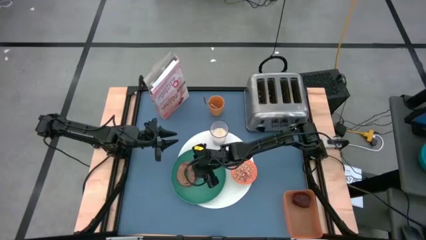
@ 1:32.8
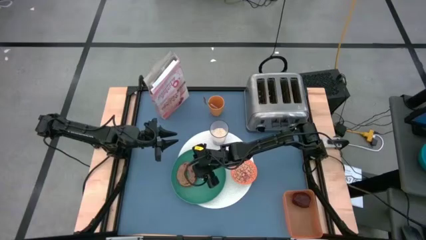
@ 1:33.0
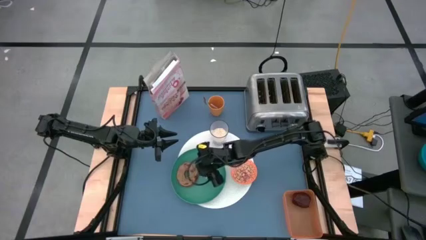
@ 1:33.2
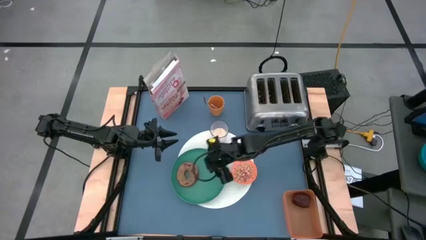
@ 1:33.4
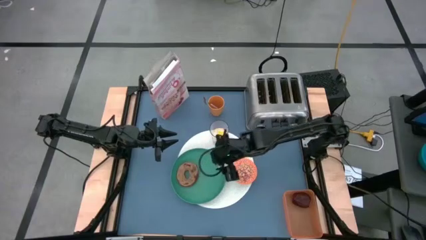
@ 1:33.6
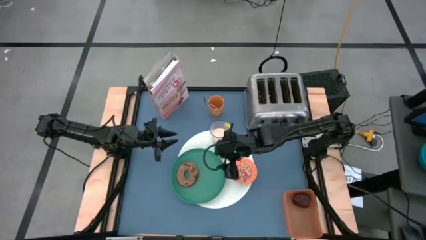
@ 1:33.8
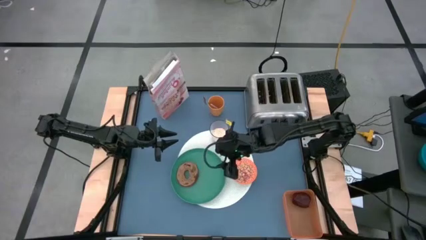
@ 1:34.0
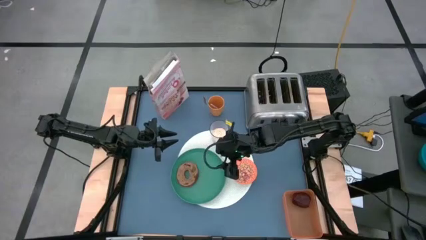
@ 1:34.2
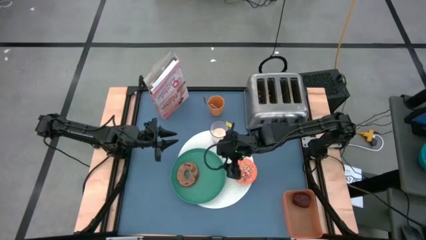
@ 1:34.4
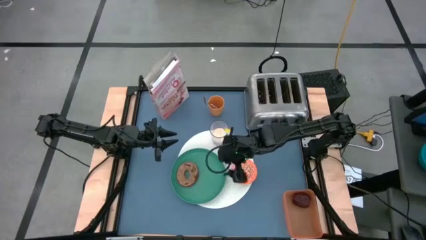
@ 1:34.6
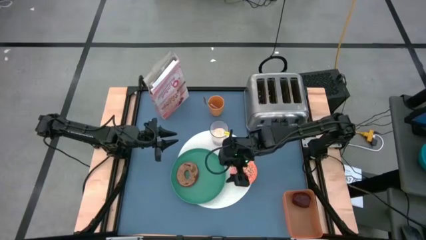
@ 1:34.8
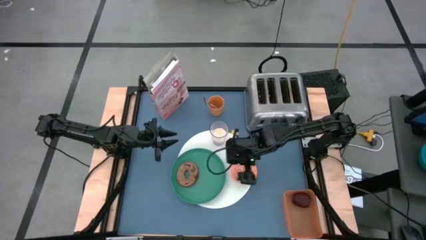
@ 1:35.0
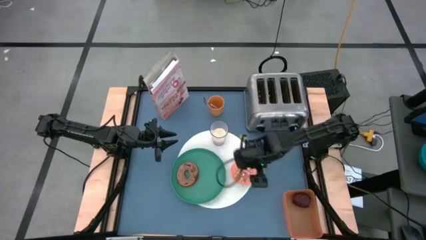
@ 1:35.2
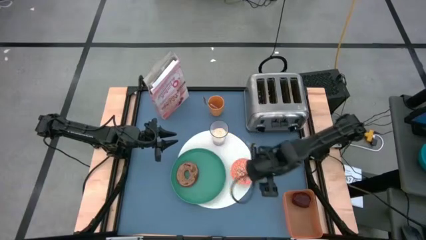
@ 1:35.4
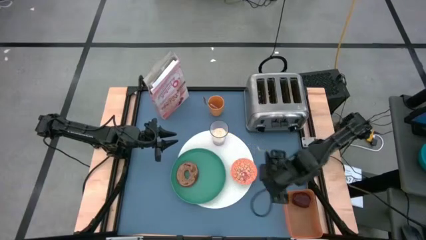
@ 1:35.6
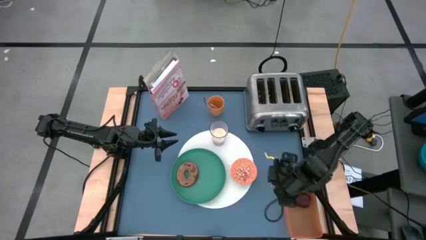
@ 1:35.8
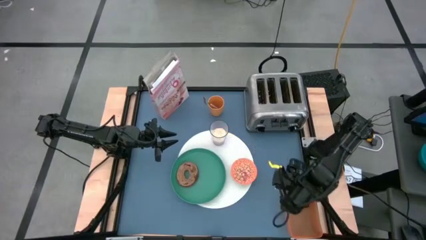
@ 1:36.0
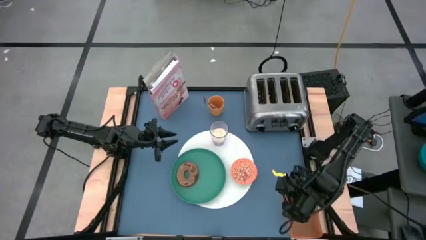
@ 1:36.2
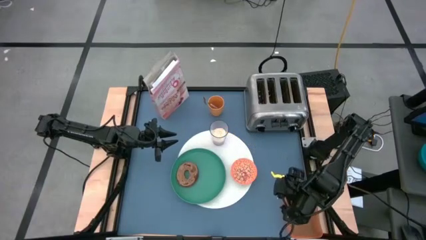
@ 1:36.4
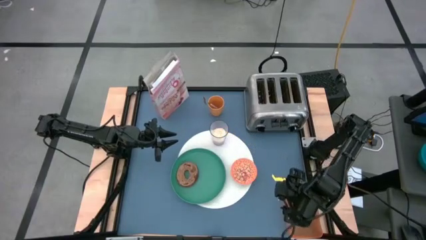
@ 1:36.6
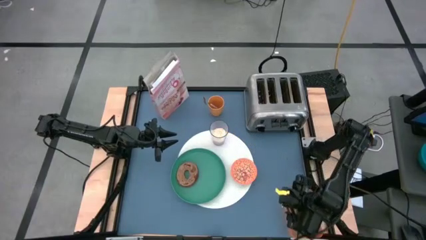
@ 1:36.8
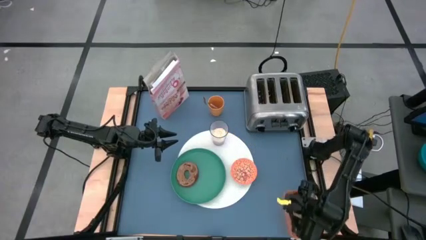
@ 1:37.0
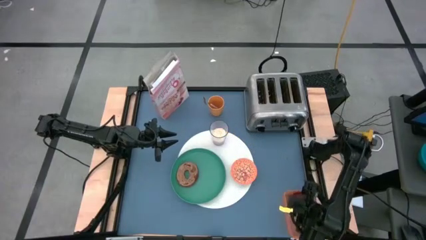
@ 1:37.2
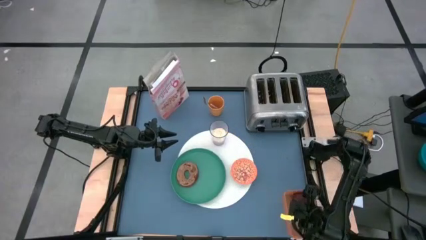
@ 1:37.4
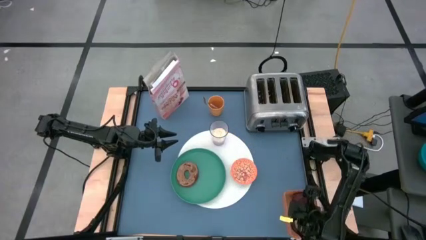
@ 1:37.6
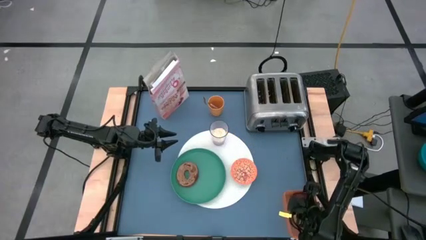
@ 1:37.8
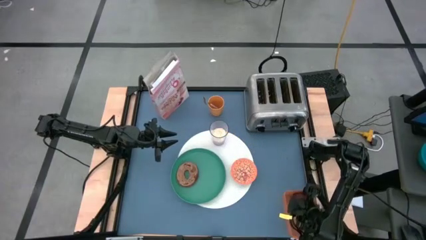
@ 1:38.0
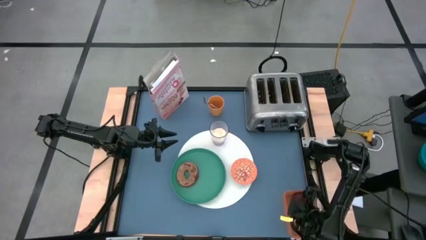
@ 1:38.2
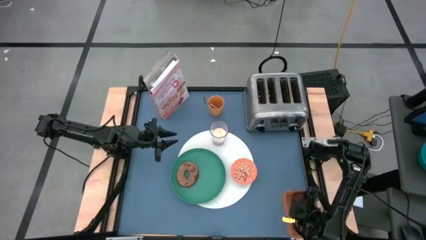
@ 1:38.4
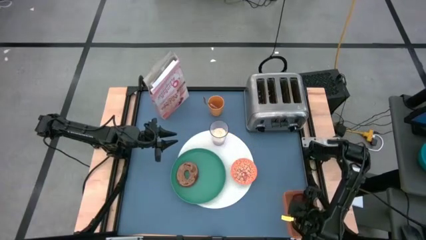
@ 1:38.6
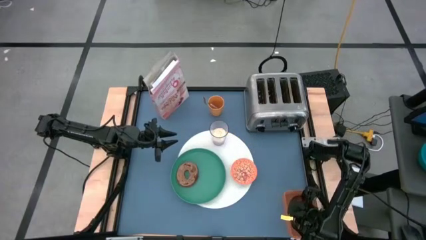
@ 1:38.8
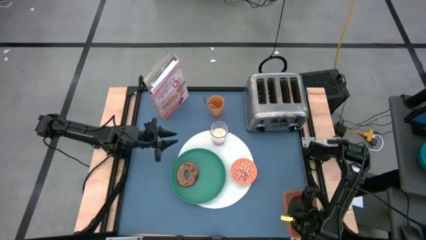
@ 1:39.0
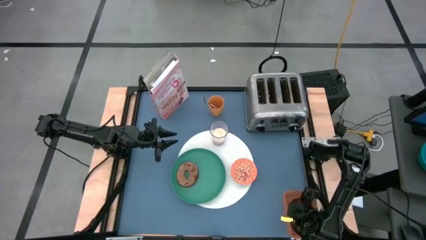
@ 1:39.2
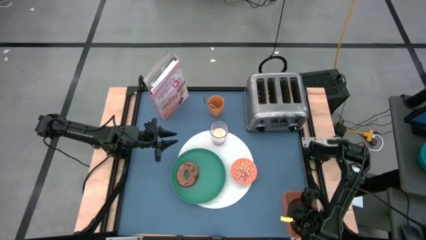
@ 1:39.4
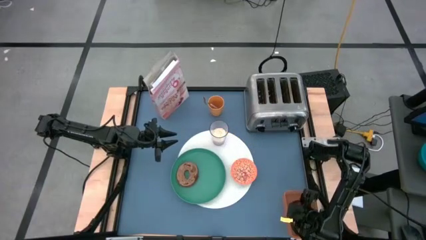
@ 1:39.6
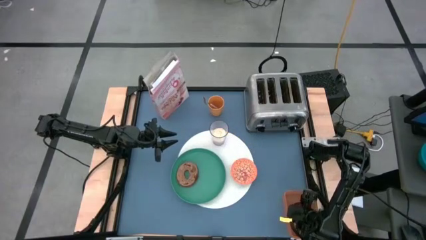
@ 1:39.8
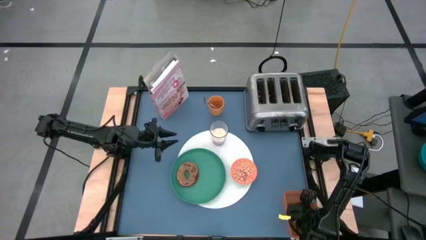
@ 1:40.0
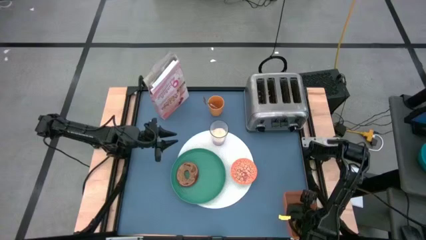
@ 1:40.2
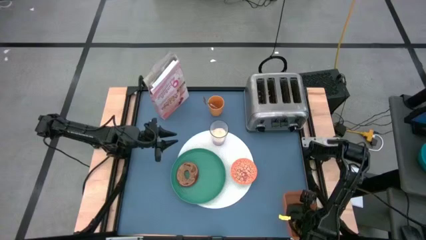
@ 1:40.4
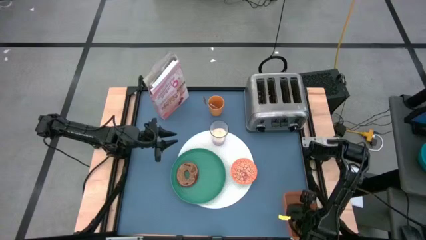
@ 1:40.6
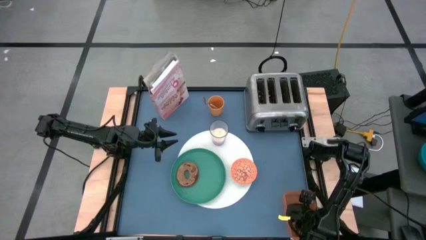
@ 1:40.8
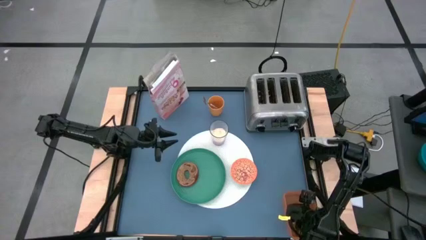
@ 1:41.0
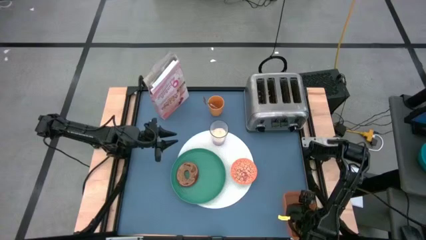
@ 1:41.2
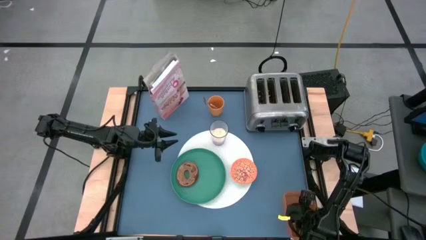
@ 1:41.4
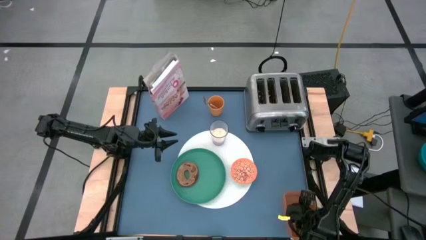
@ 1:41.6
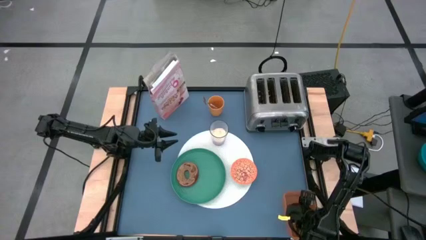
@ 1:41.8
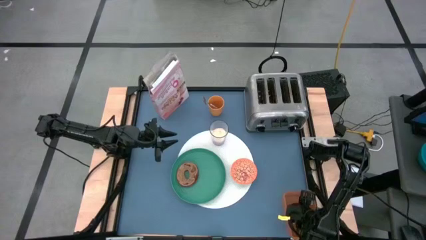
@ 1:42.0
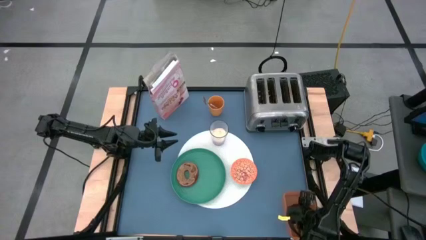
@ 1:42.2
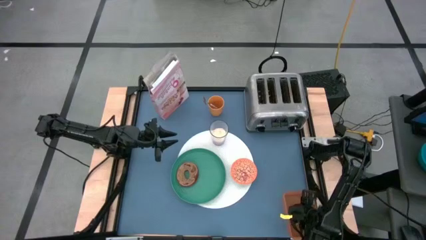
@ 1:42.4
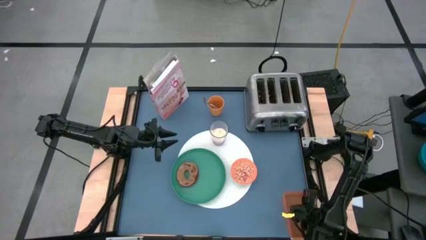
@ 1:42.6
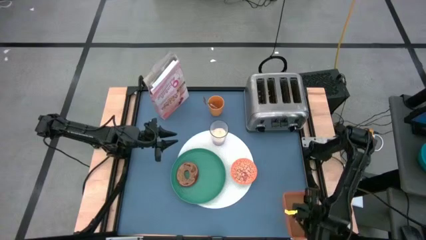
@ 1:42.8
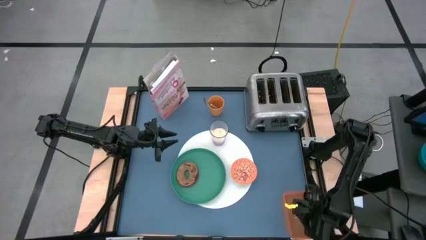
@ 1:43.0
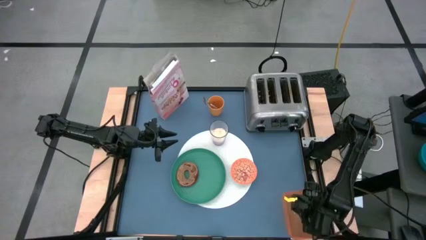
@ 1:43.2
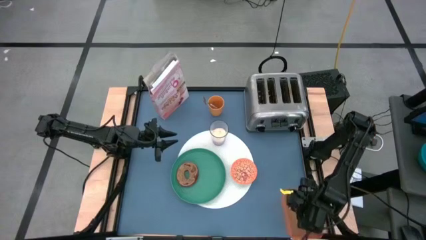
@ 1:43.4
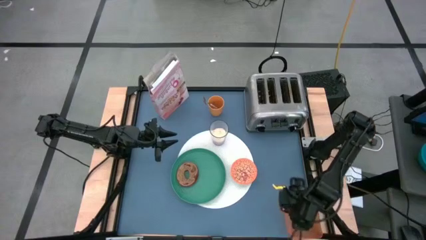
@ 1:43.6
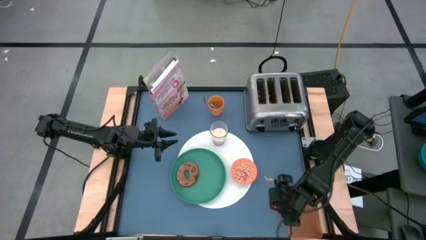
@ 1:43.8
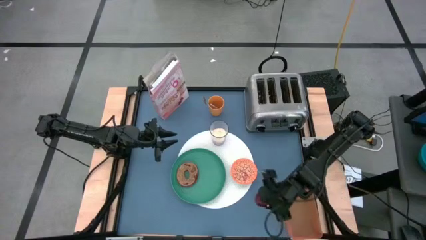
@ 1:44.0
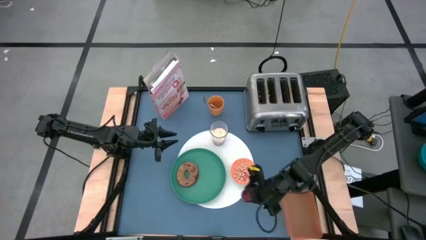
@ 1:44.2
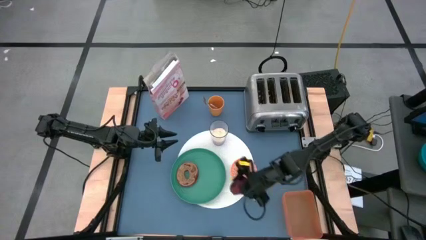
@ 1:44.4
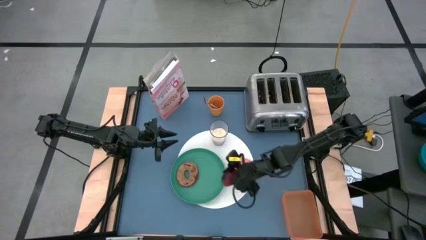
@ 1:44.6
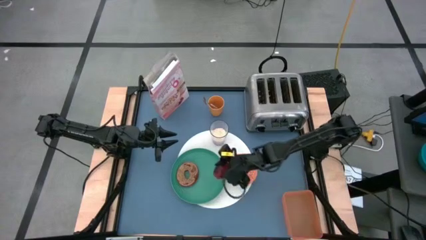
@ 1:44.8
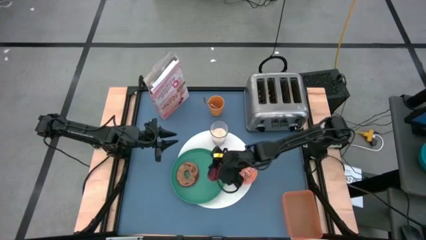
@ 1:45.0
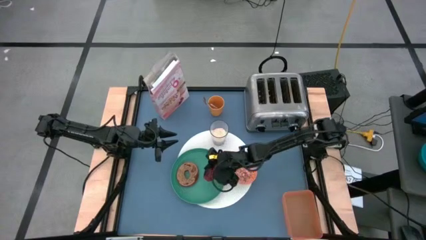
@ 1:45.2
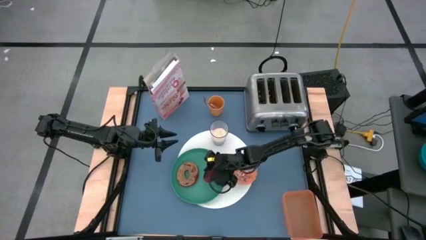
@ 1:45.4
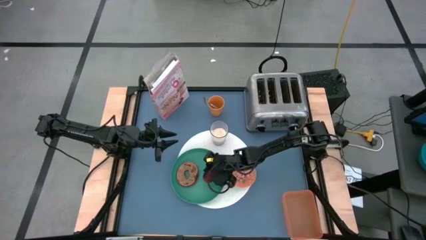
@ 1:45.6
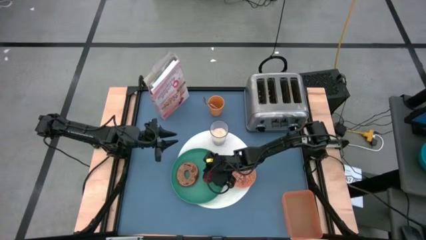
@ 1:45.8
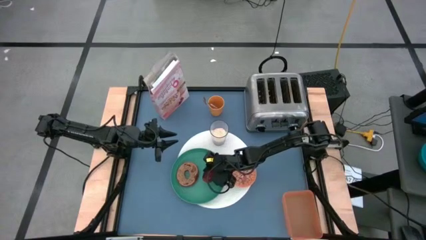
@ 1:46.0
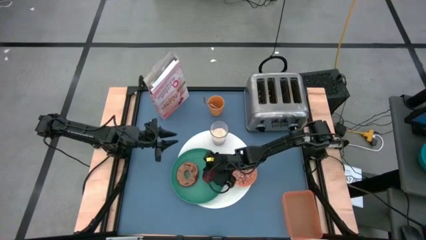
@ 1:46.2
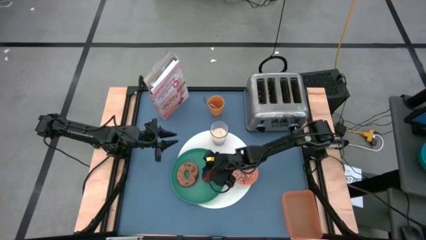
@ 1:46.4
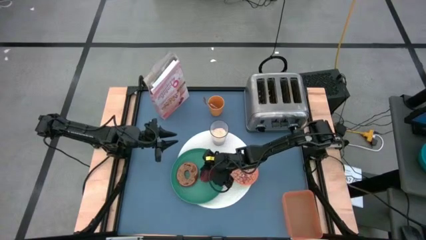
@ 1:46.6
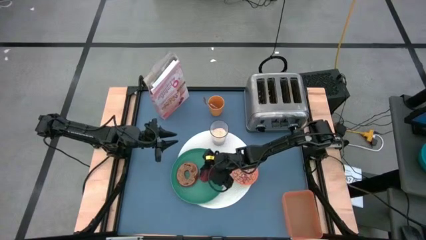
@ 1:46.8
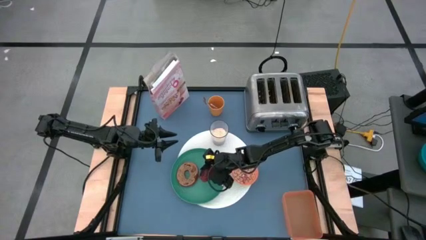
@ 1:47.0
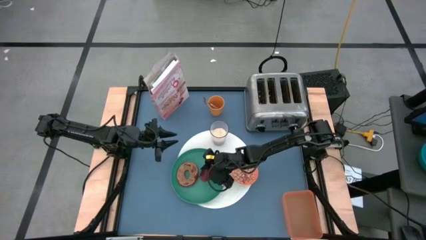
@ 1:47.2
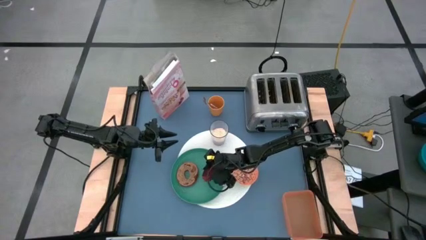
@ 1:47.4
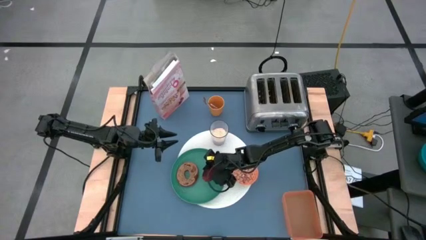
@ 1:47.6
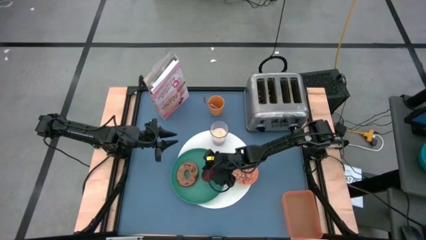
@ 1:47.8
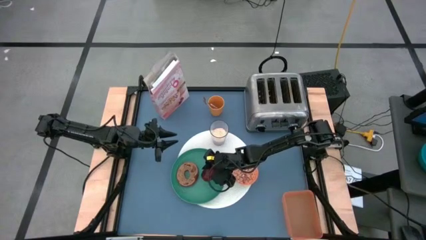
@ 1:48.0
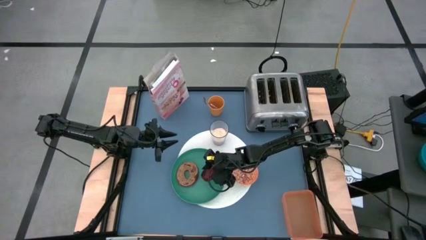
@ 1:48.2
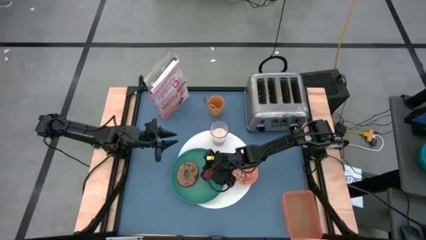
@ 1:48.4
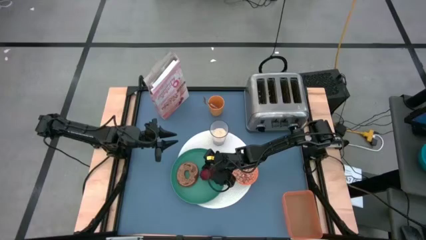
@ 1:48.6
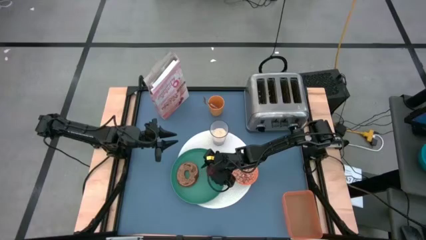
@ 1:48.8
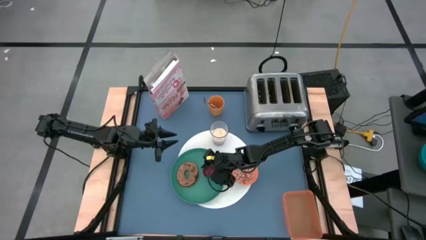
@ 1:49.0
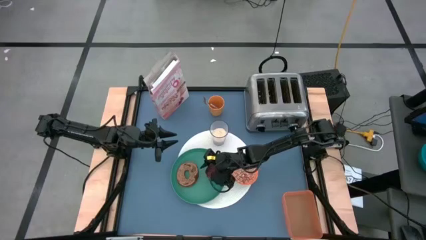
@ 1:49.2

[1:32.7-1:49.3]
Task: Arrange a breakfast setting
Put the red apple on the green plate

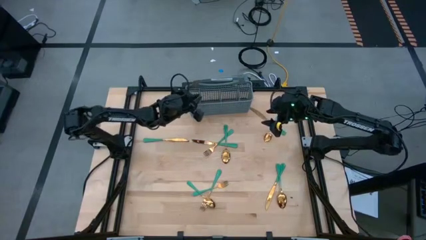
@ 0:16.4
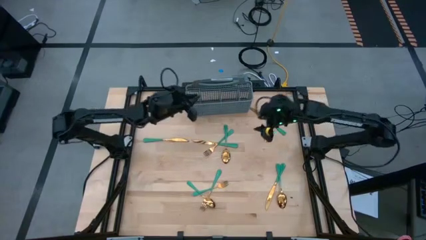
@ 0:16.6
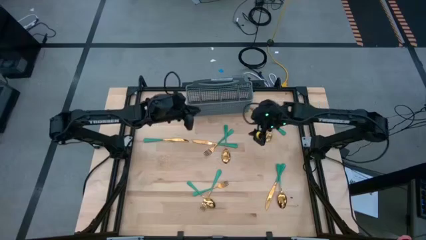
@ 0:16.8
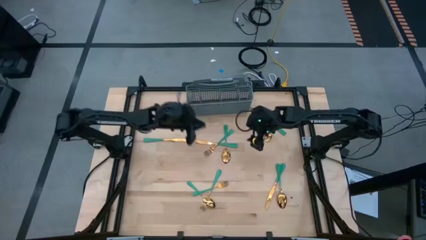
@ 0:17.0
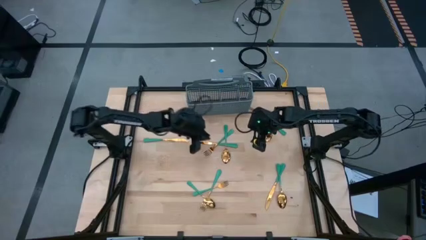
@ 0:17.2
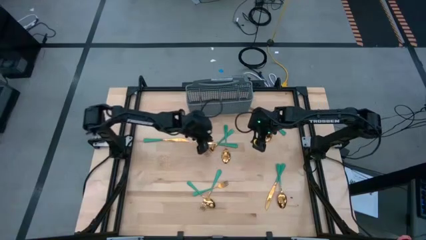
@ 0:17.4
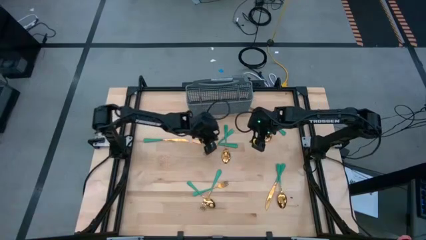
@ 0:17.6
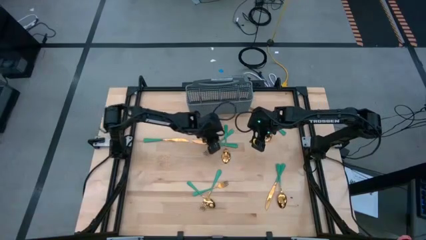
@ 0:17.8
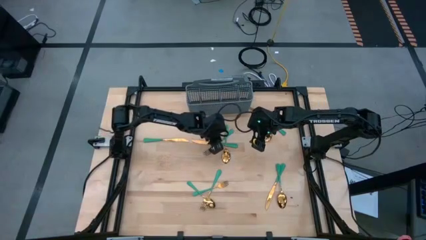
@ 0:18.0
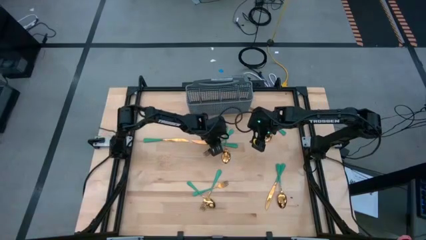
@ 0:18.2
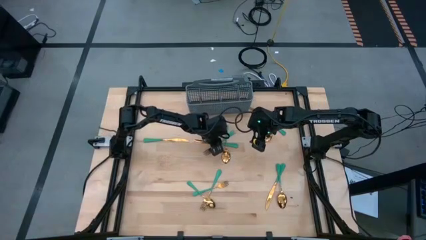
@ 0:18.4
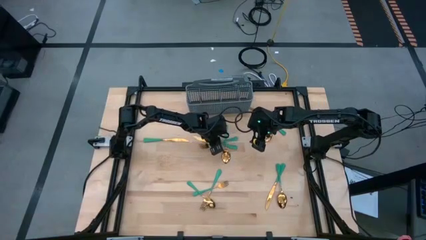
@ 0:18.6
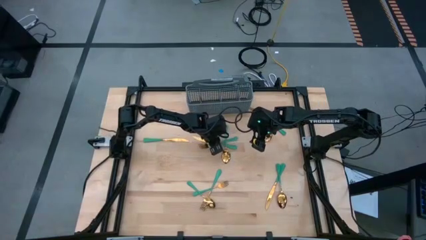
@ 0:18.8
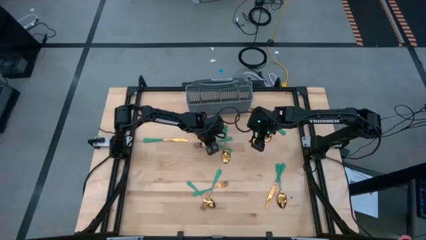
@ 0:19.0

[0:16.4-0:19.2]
Task: Sort silverware
Put the gold fork into the left section of the gray utensil holder
